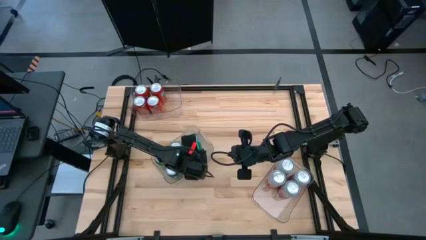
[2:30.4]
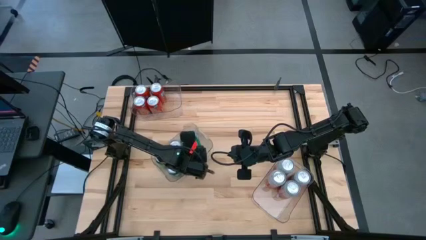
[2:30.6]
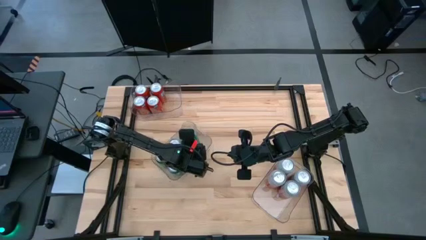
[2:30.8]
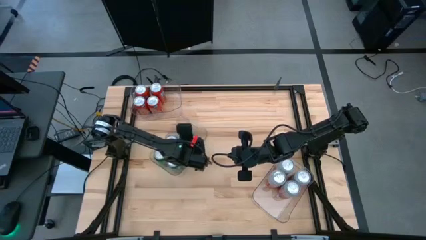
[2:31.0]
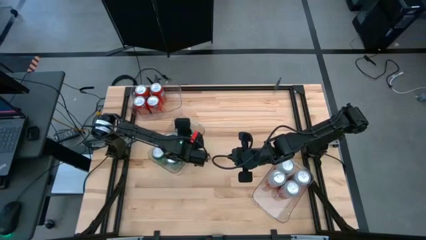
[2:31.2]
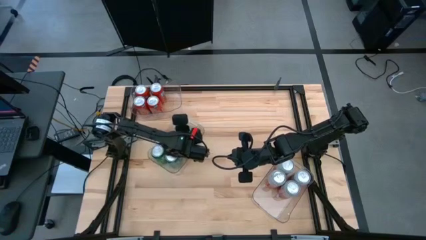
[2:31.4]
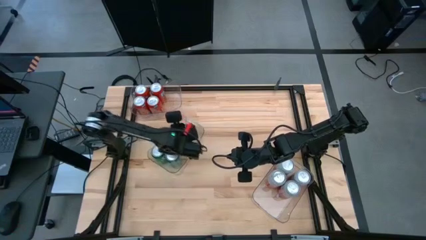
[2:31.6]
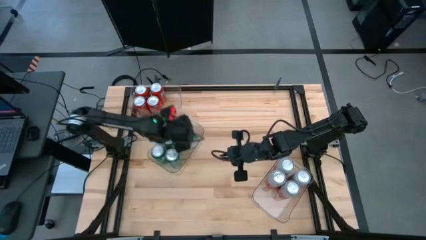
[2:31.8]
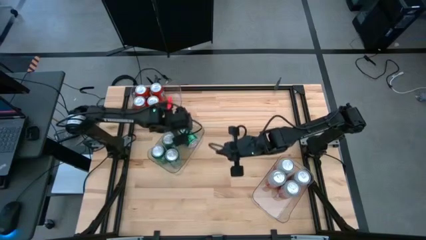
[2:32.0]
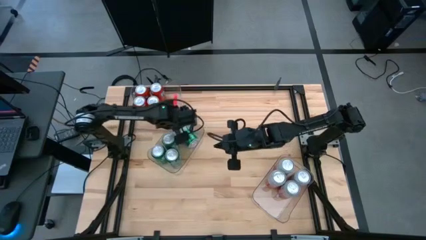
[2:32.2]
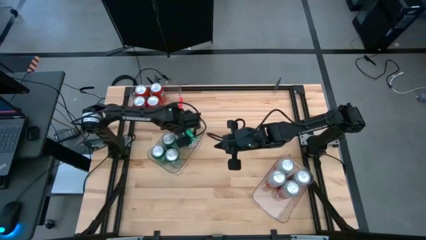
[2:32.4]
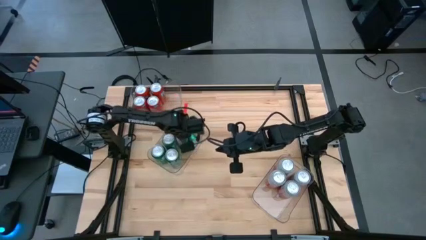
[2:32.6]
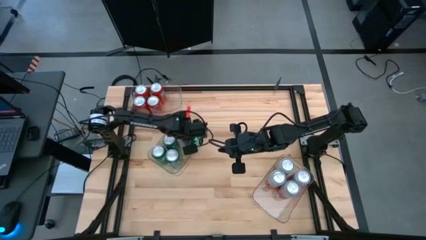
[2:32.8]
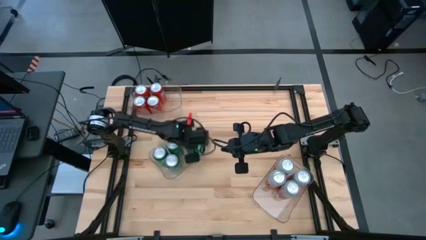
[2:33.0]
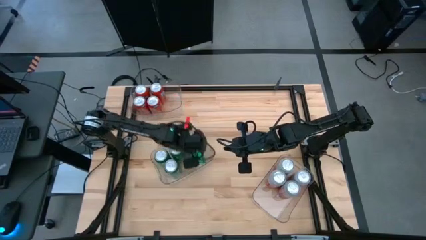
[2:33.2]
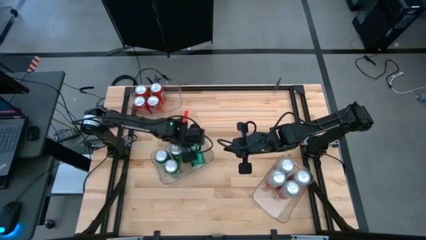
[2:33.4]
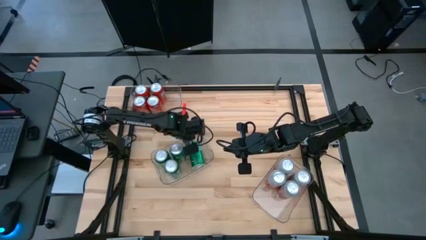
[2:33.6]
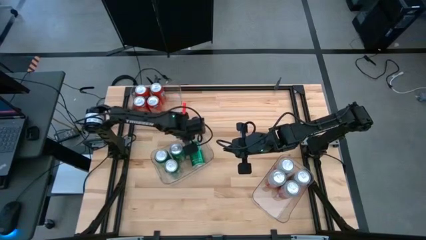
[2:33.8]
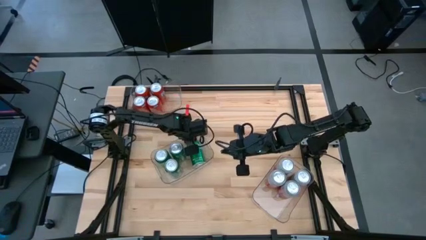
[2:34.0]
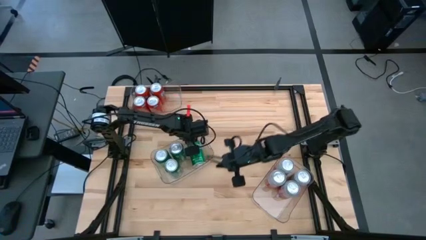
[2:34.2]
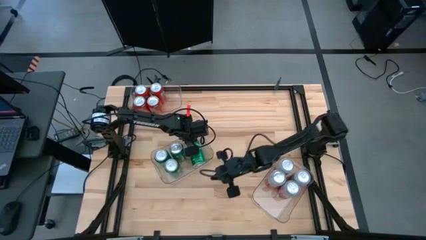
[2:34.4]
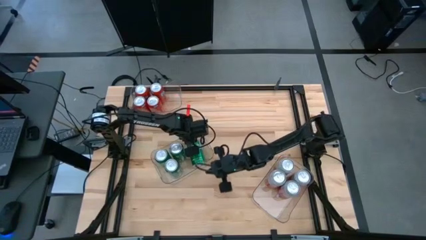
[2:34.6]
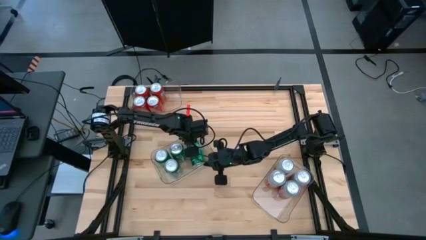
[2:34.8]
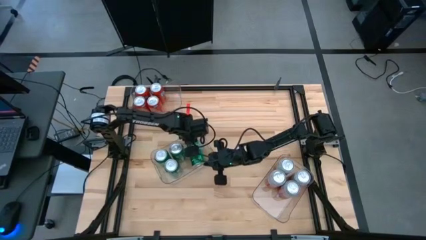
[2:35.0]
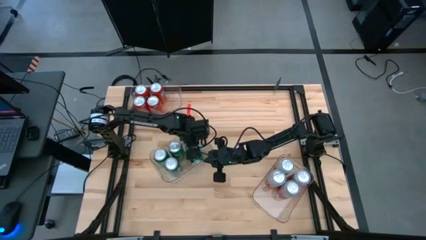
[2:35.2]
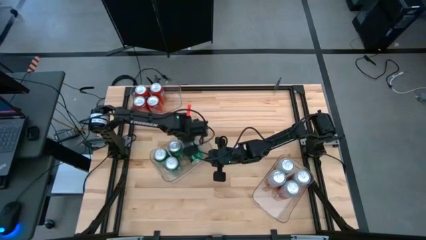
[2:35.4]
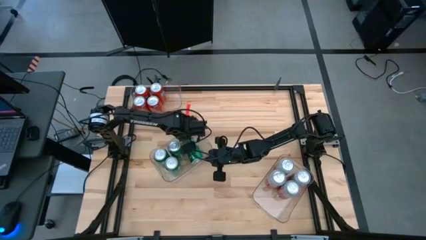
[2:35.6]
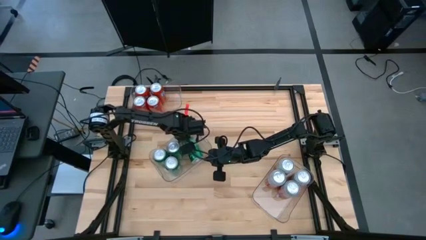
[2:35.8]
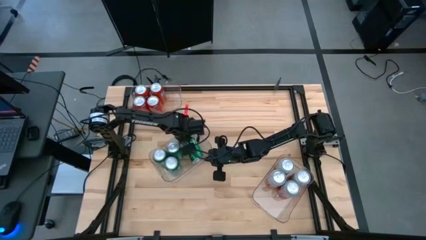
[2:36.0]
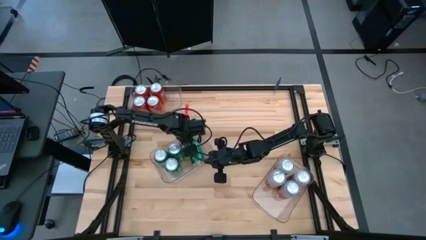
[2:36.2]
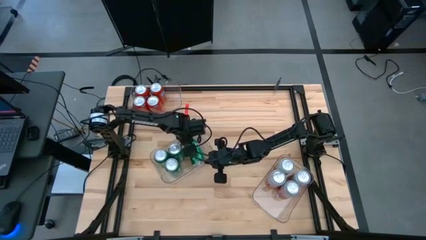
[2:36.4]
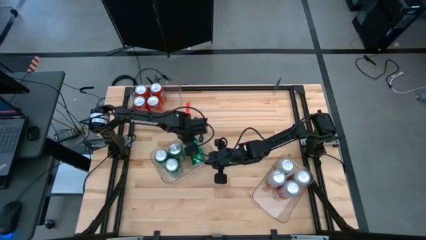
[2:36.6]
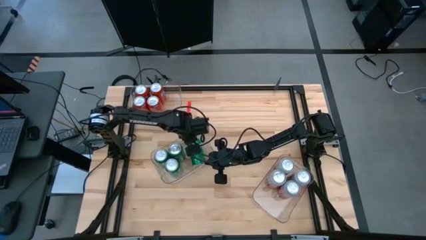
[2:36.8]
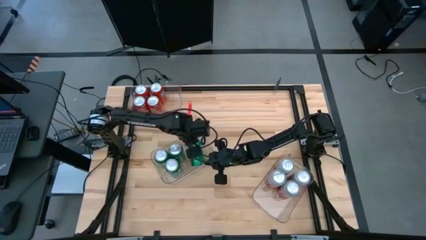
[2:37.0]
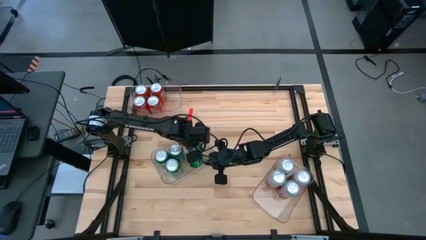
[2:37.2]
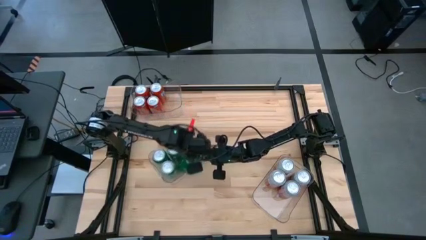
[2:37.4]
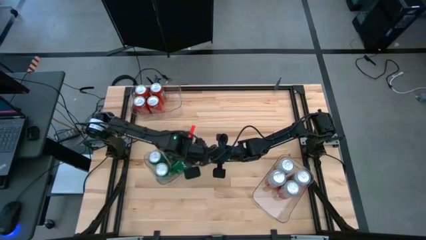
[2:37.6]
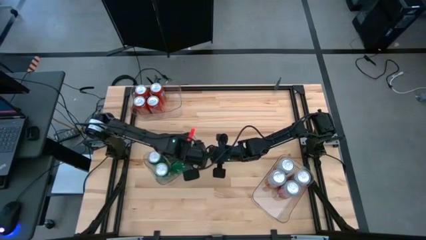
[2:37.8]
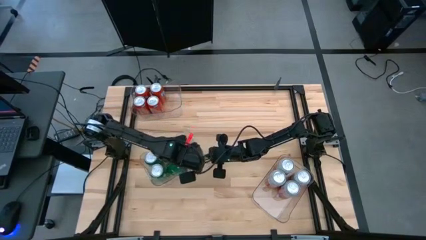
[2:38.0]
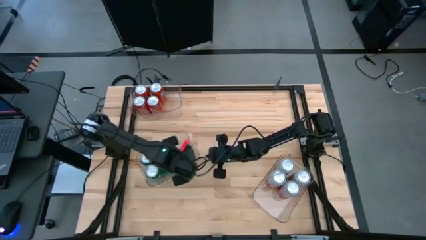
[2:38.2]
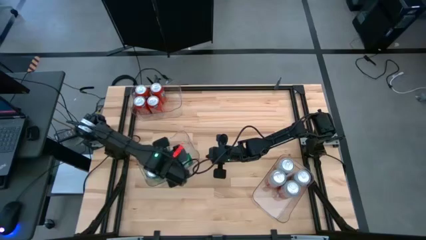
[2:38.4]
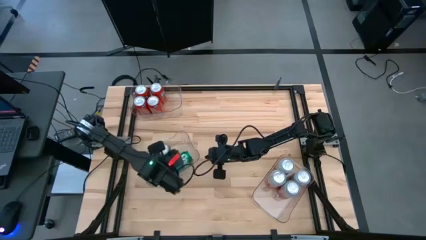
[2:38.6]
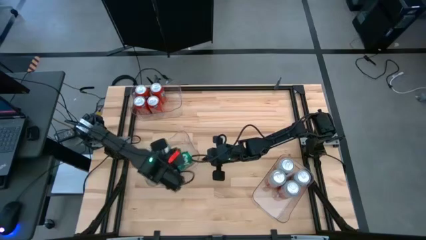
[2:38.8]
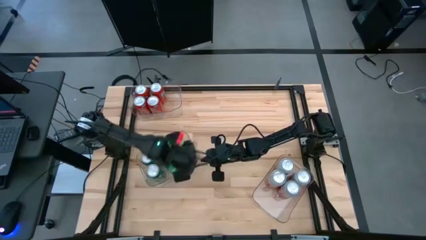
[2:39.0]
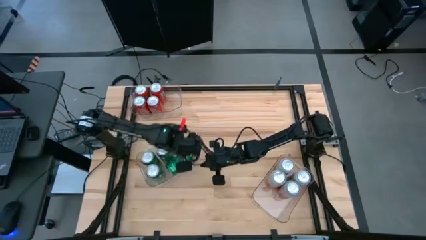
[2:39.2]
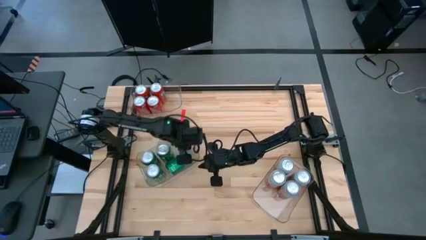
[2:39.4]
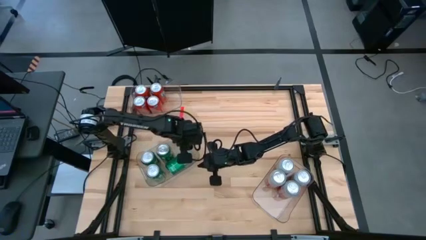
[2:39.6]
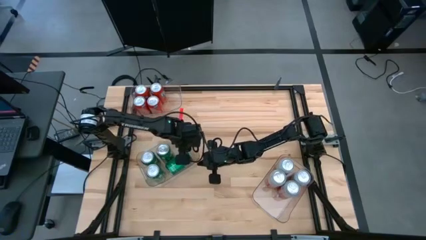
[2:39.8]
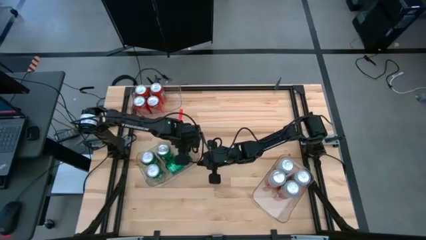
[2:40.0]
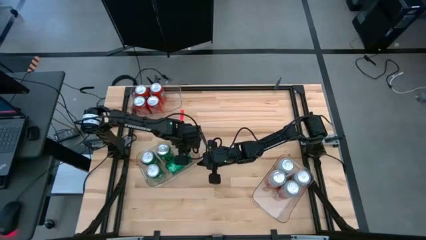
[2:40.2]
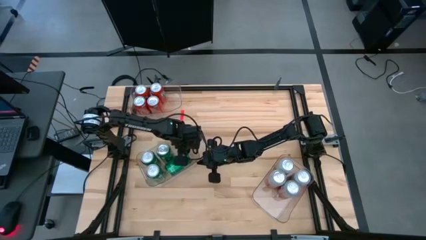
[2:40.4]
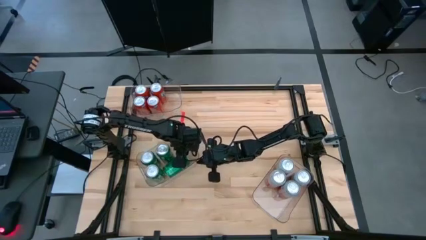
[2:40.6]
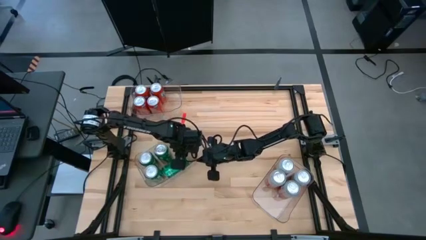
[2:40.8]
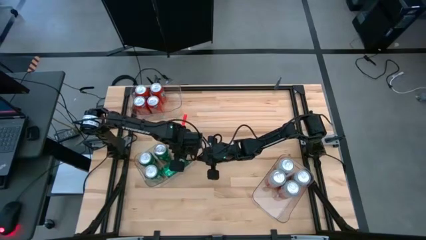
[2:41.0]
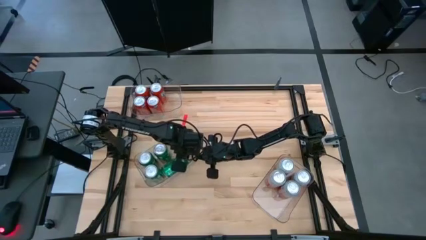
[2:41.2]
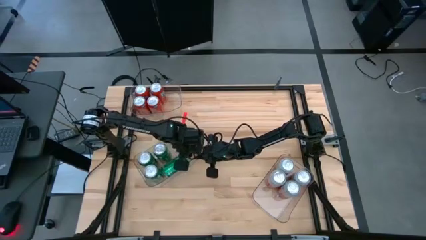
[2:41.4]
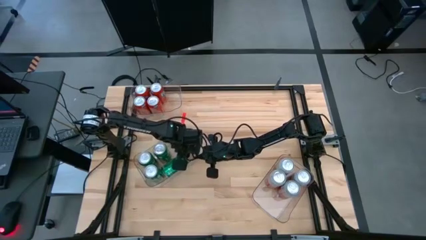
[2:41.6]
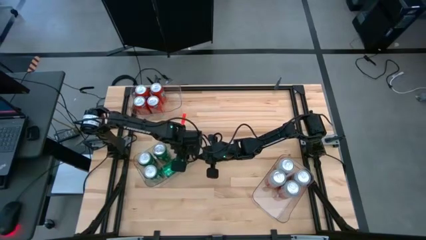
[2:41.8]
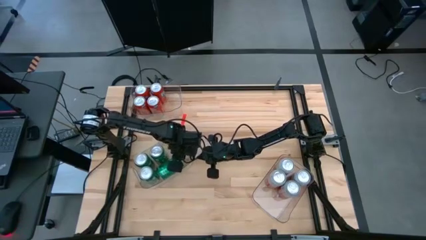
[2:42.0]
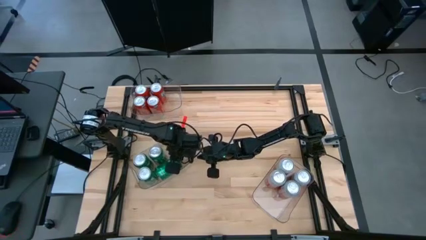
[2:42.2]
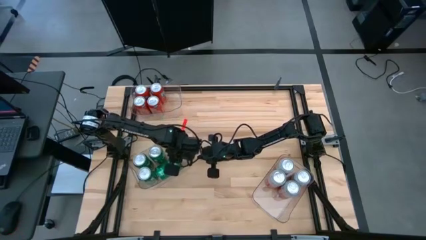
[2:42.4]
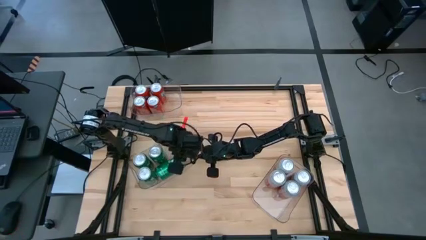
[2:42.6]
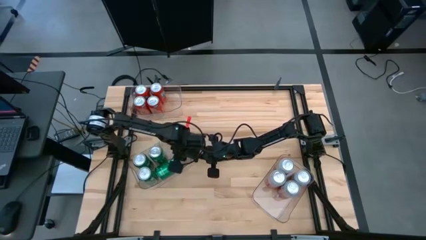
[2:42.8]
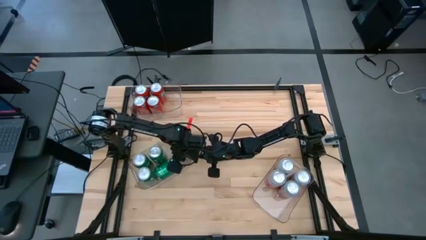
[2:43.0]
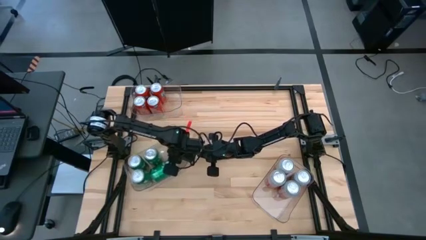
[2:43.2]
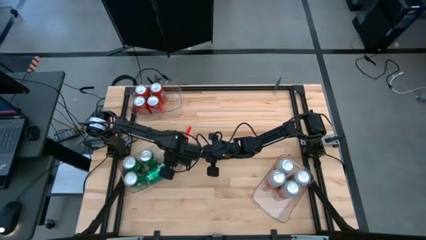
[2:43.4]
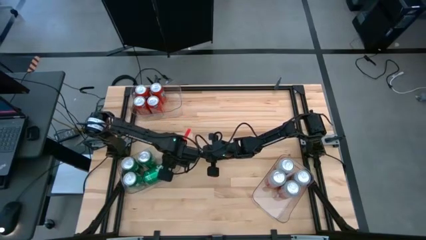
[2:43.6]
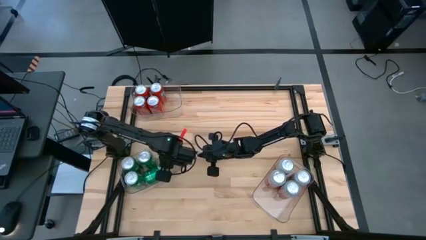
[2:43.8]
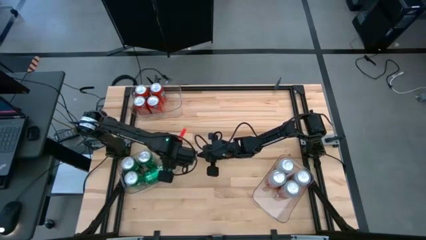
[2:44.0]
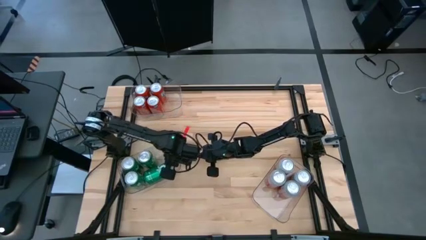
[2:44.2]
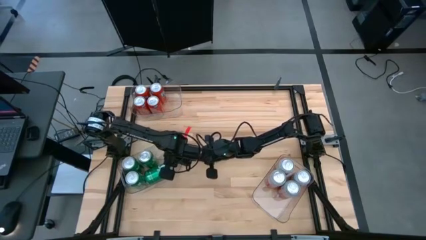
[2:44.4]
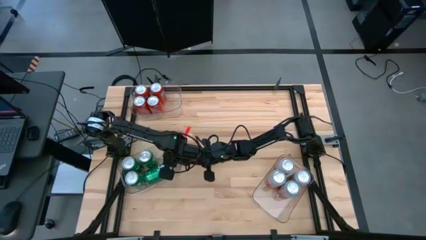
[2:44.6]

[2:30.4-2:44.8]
Task: Sort soda cans
Adjust the green soda can in the transparent bin

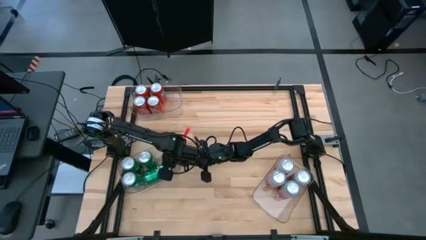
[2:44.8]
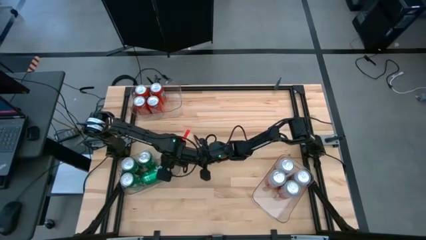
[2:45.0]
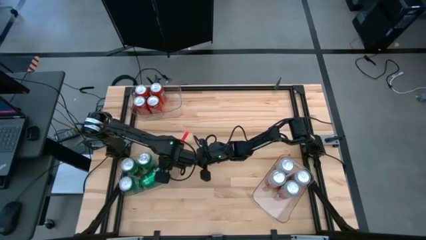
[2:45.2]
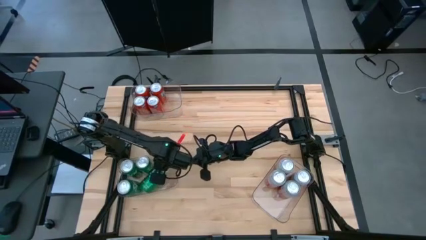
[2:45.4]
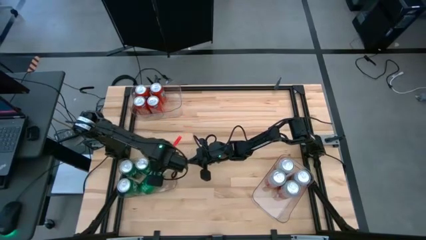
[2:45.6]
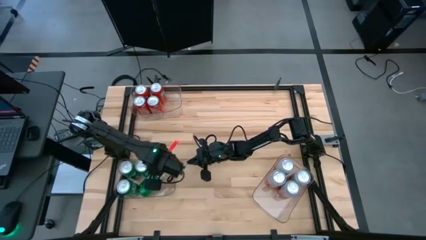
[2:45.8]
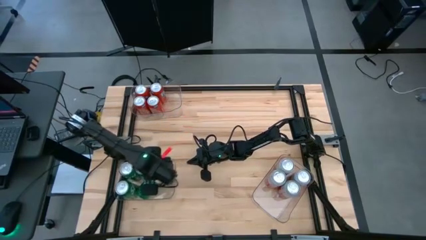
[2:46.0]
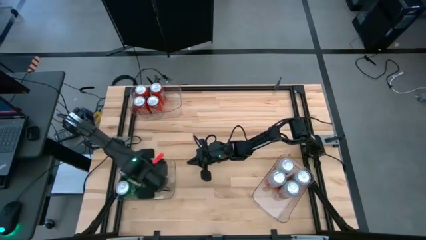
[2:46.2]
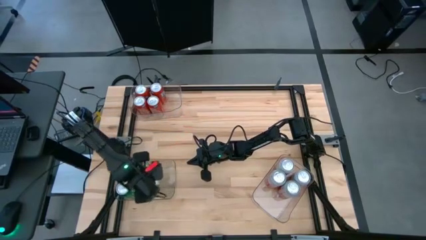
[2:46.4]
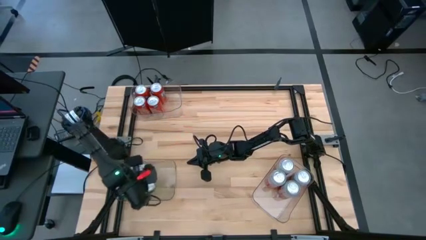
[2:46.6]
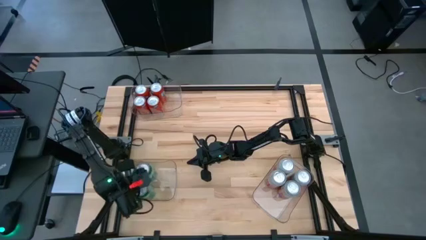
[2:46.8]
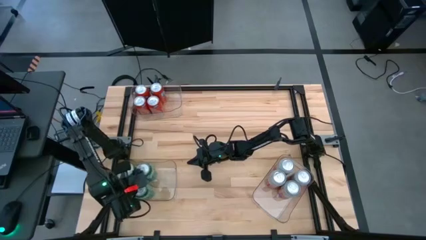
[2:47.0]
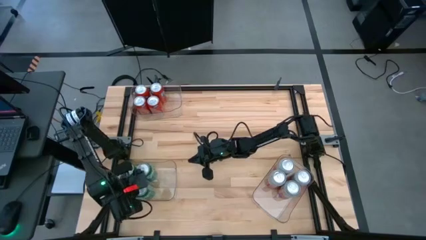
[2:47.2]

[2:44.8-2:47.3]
Adjust the bottom right green soda can in the transparent bin
